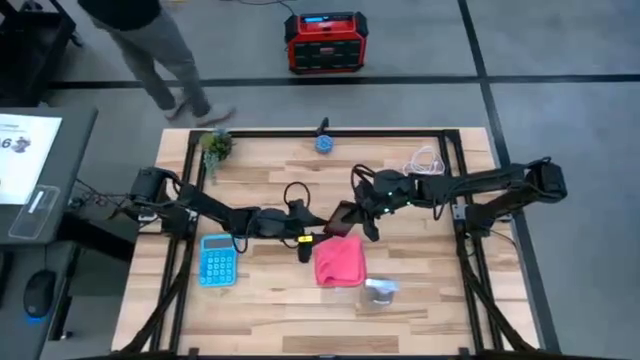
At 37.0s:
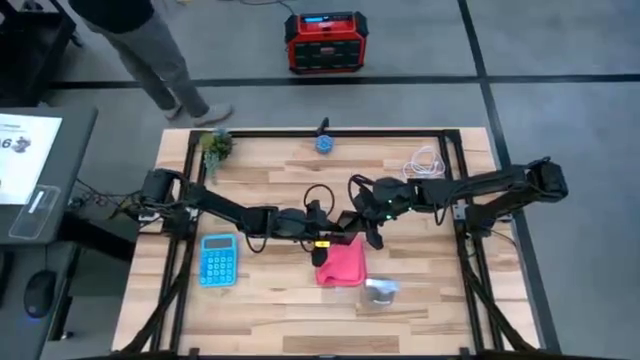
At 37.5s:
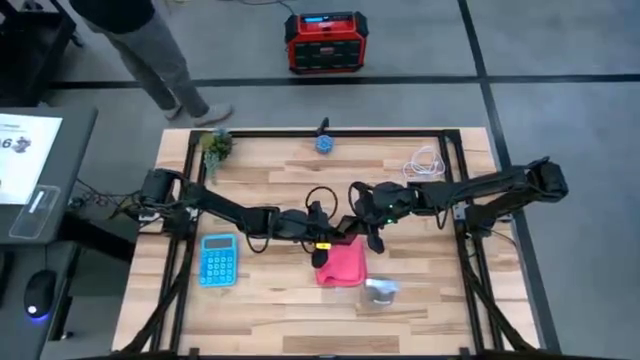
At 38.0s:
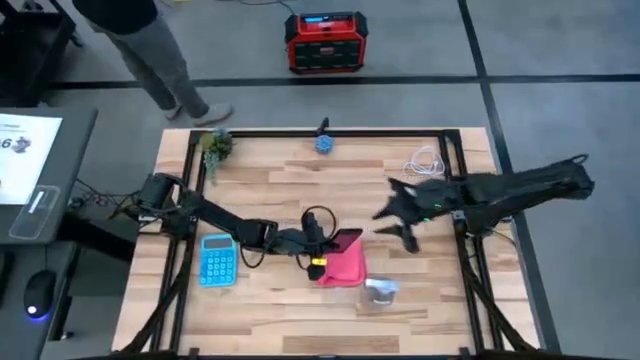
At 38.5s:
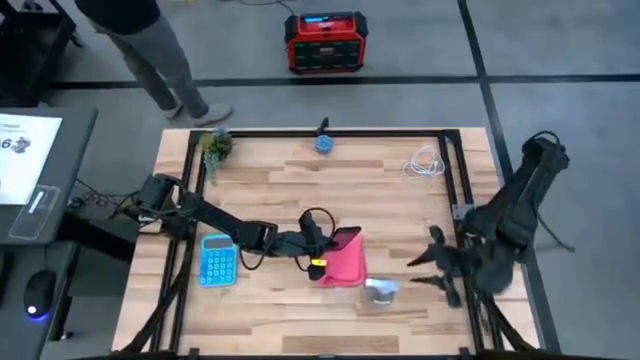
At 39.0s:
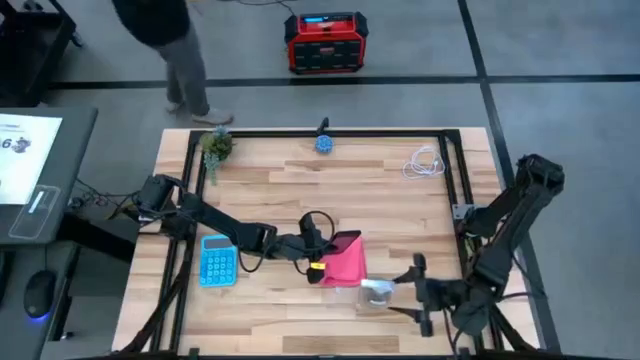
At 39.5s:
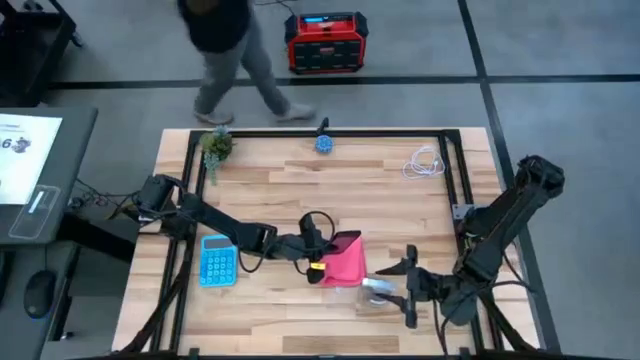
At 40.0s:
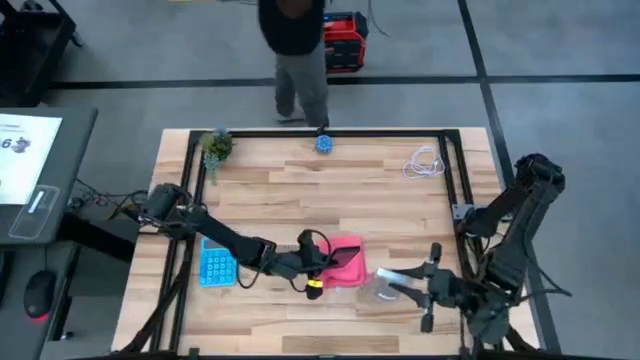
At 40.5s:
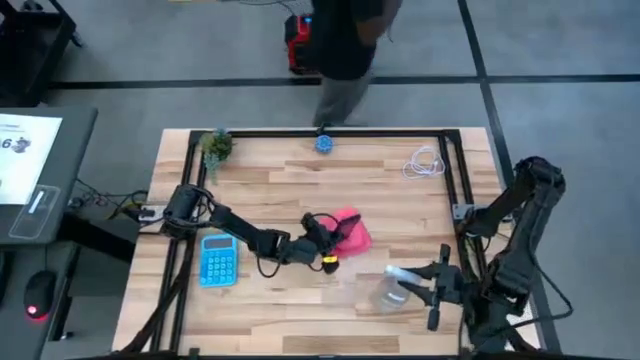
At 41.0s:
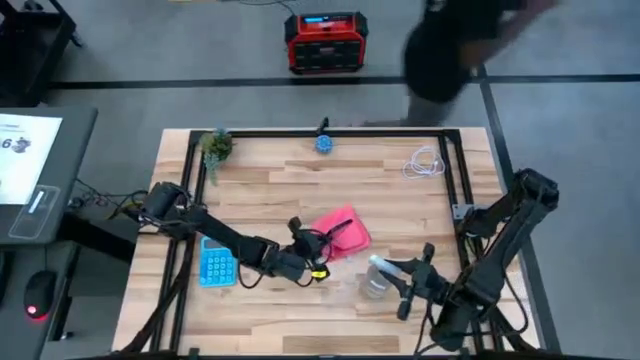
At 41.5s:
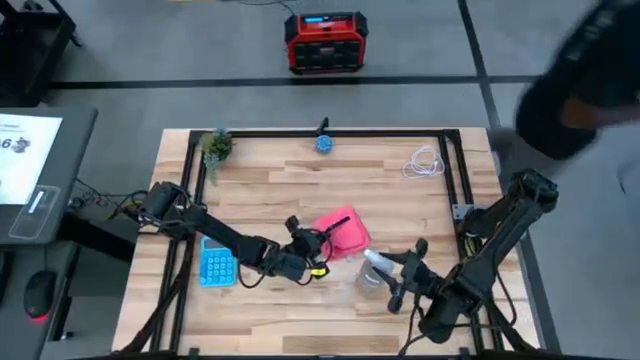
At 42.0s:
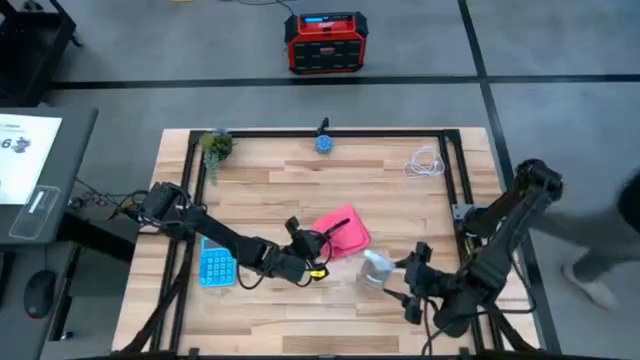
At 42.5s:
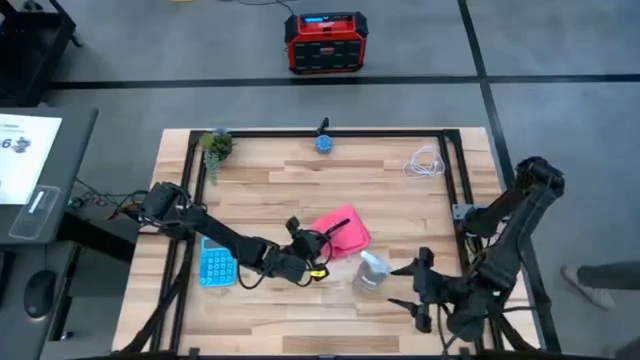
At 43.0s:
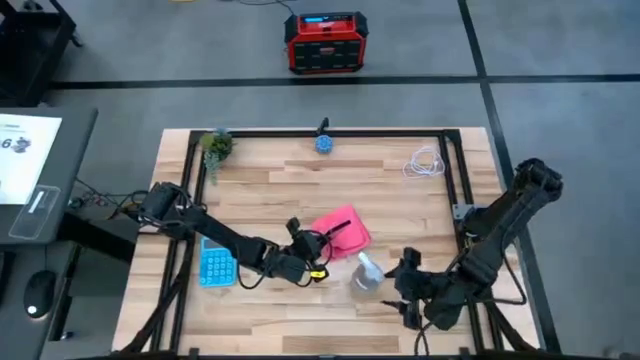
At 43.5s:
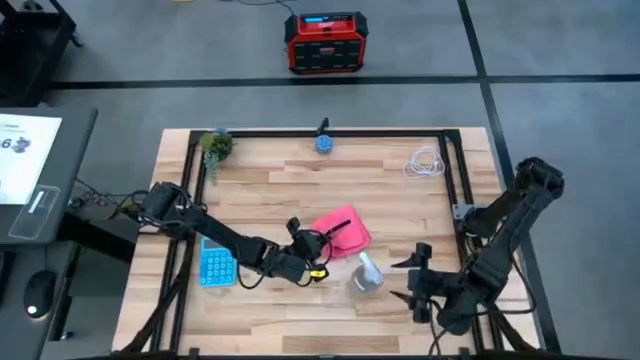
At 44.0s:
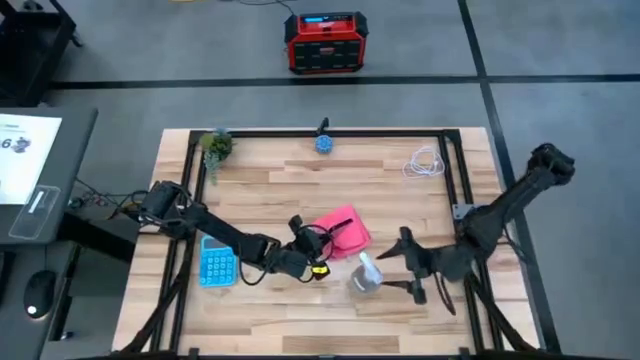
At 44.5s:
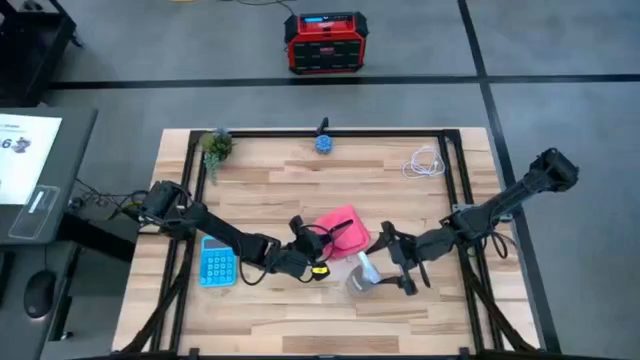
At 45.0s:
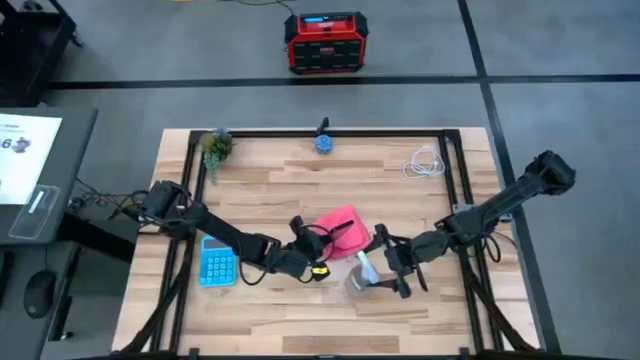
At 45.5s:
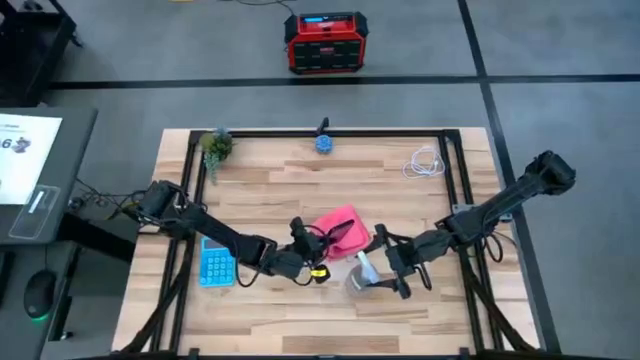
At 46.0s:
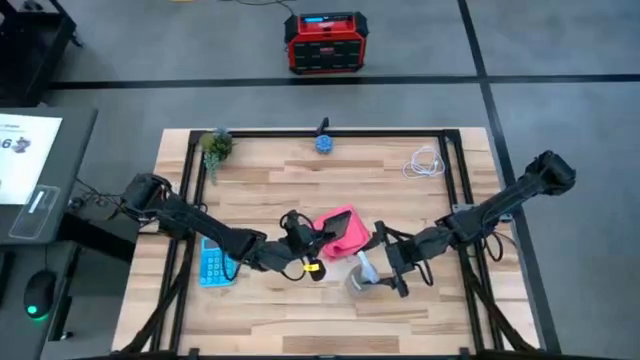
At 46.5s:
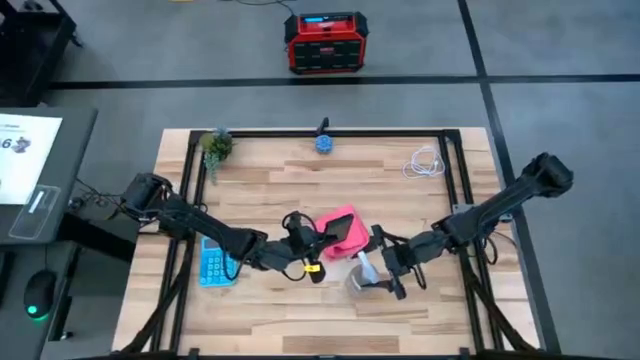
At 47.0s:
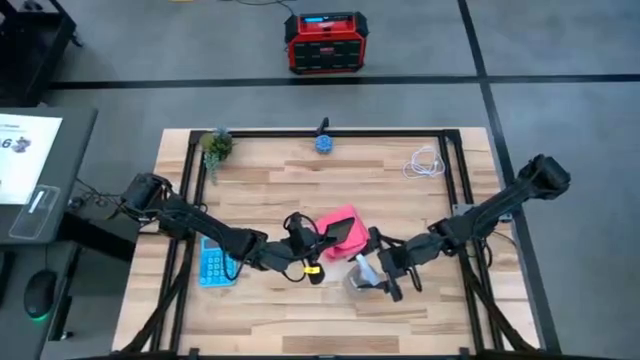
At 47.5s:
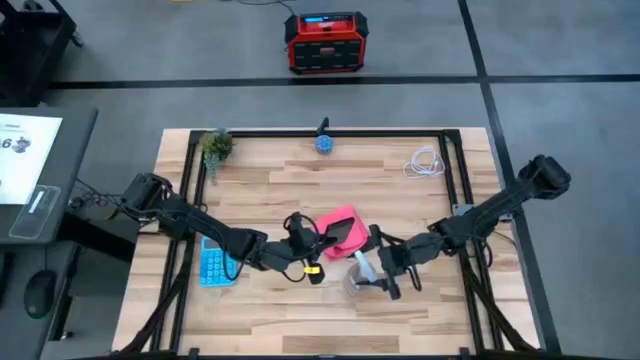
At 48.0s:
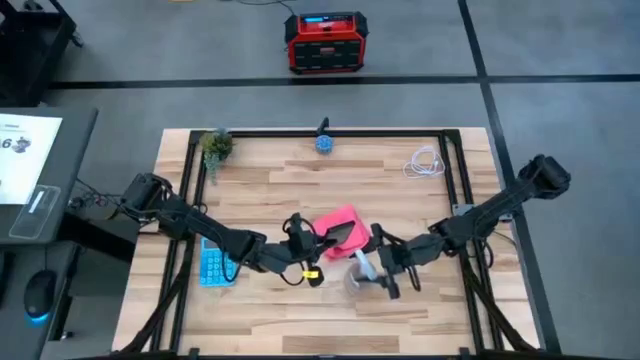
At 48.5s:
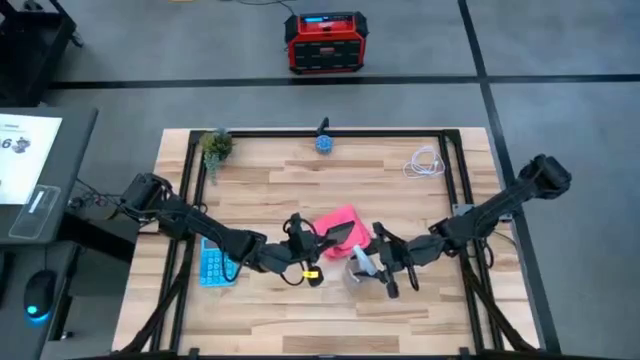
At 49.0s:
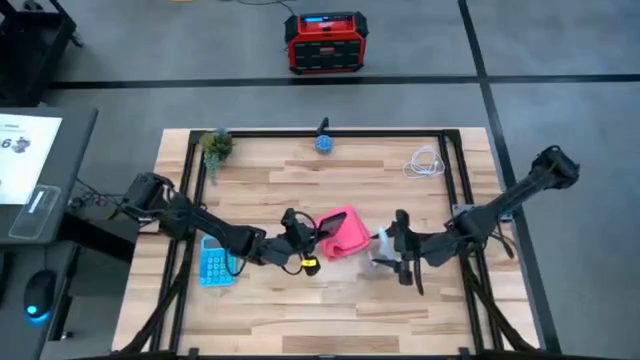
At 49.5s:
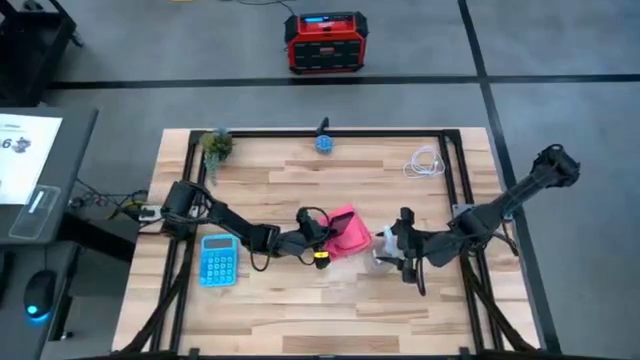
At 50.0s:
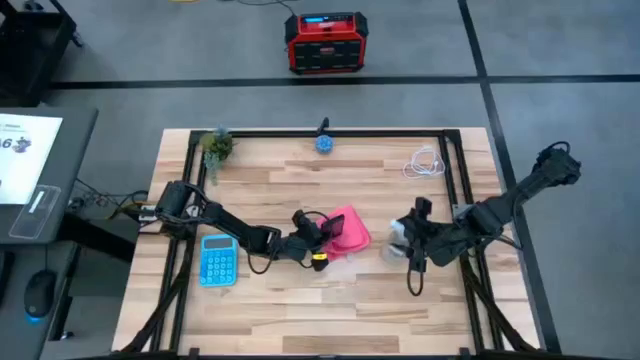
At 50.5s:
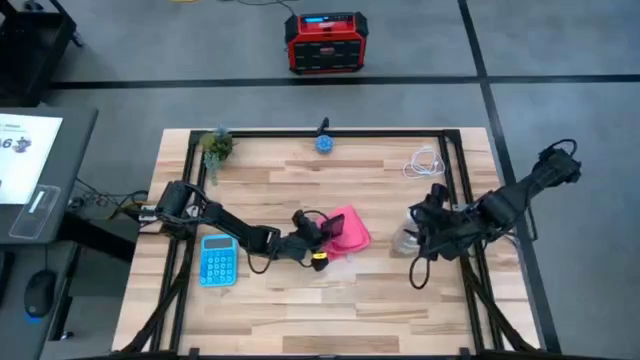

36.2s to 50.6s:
Task: Apply microfiber cloth
Spray the front of the black cellphone using transparent spray bottle

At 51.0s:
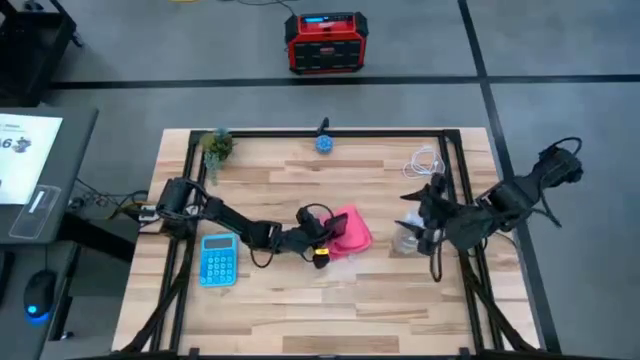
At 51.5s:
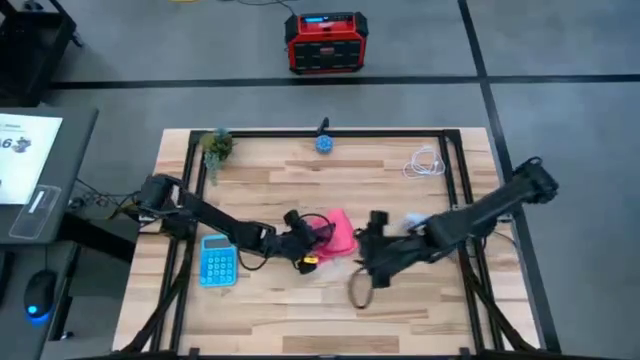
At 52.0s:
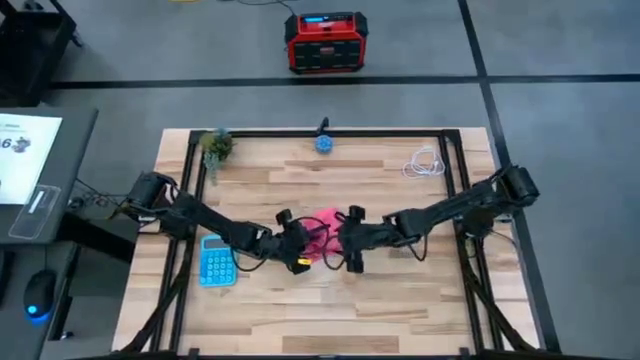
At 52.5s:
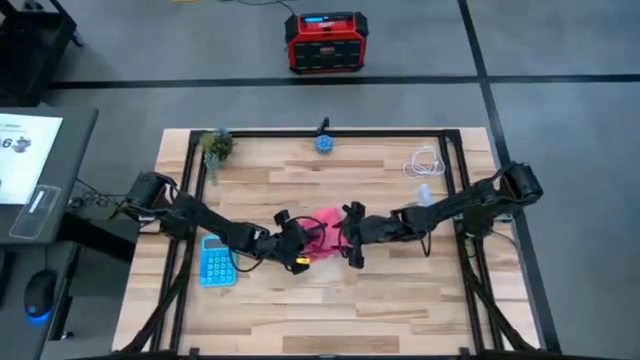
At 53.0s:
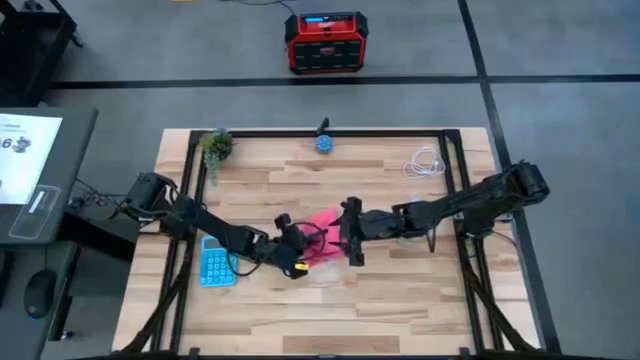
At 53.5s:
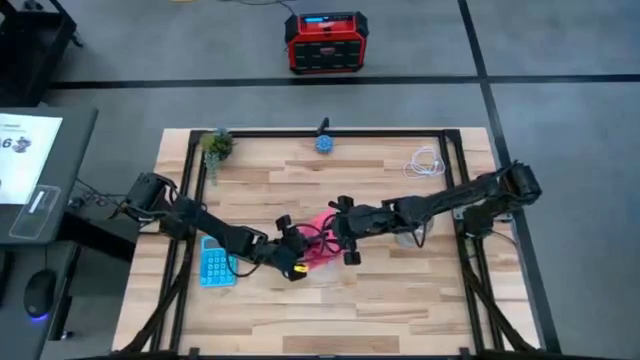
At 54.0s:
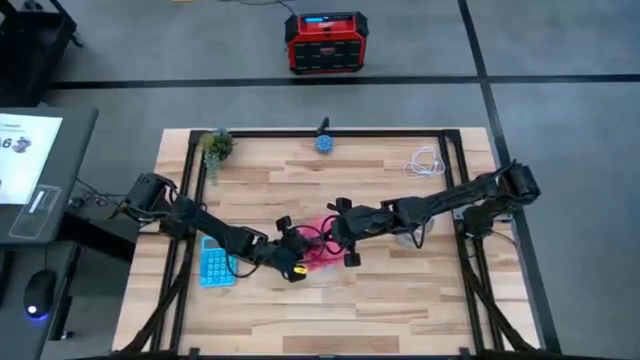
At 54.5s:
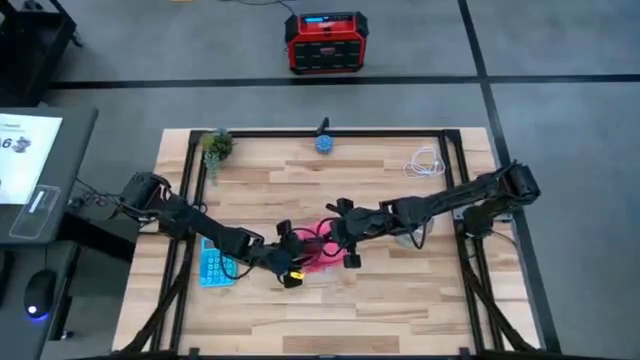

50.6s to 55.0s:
Wipe the front of the black cellphone using the pink microfiber cloth

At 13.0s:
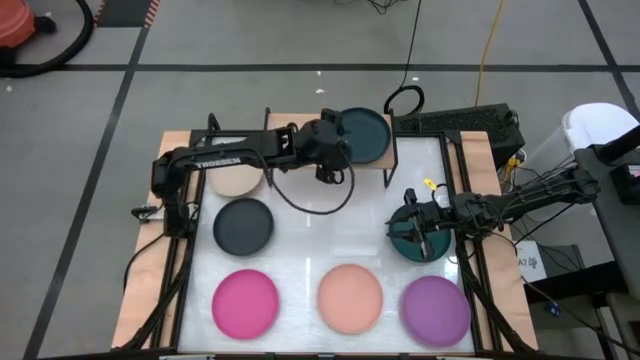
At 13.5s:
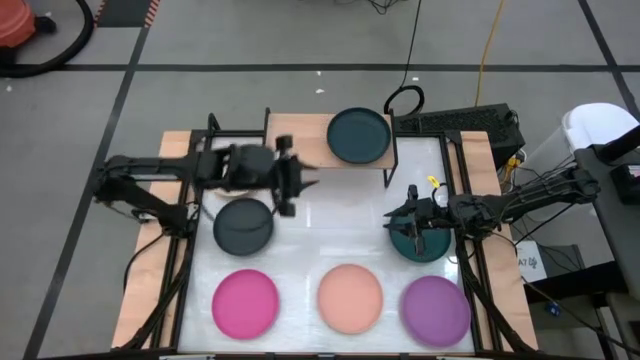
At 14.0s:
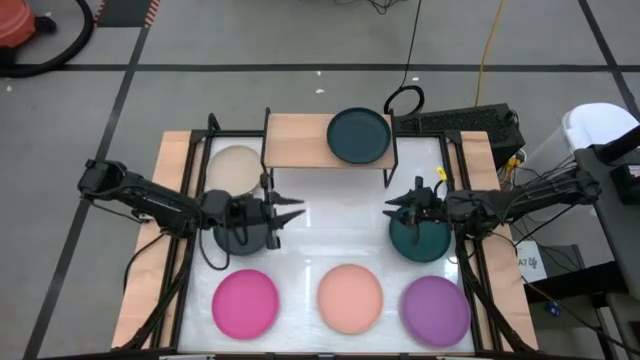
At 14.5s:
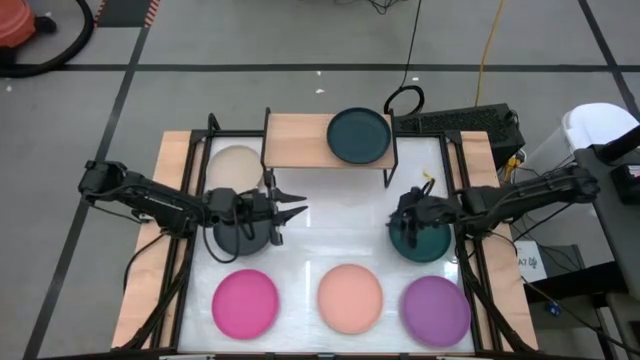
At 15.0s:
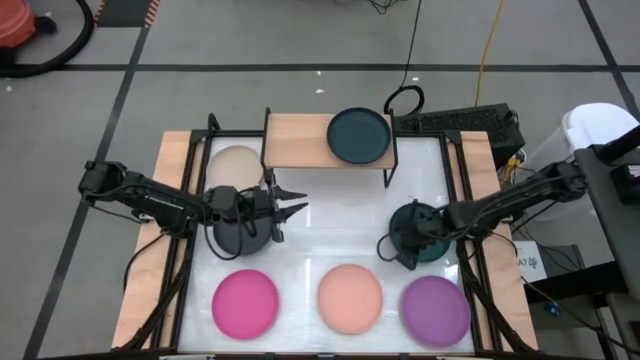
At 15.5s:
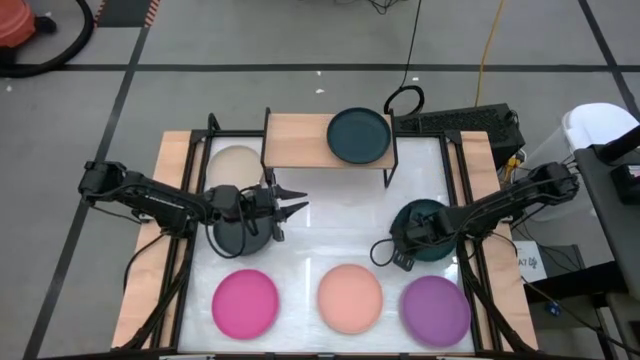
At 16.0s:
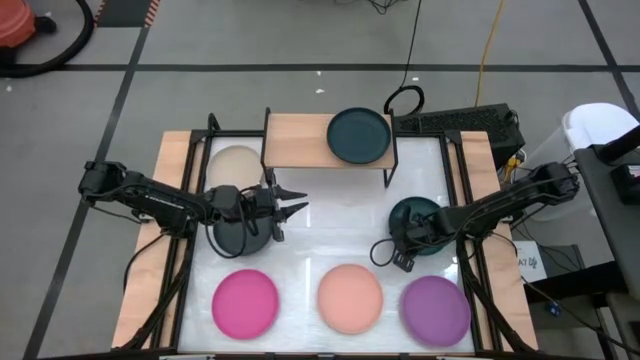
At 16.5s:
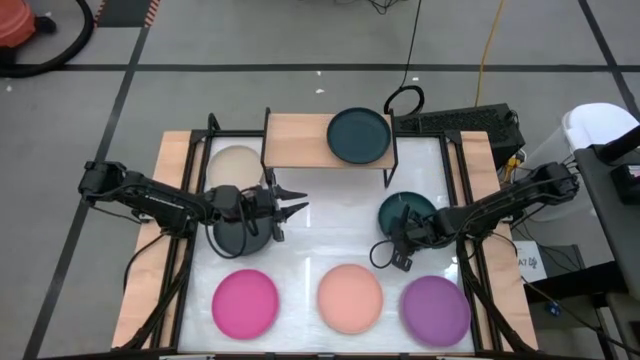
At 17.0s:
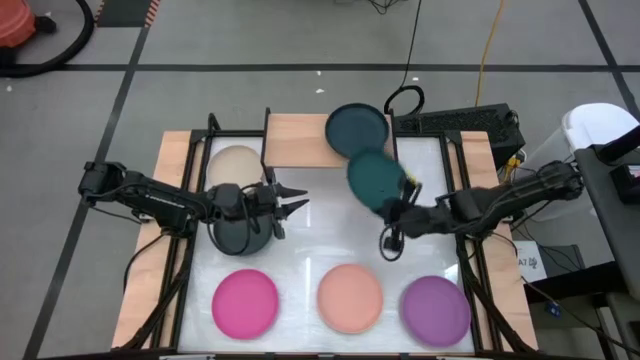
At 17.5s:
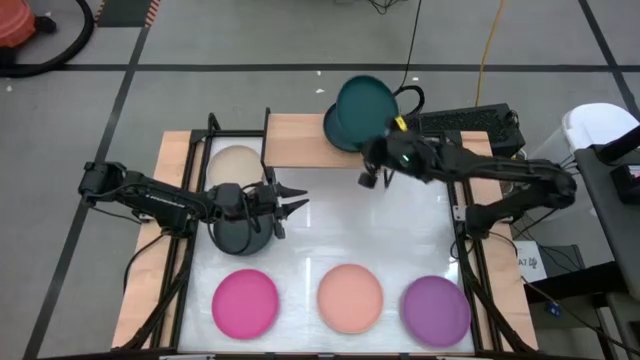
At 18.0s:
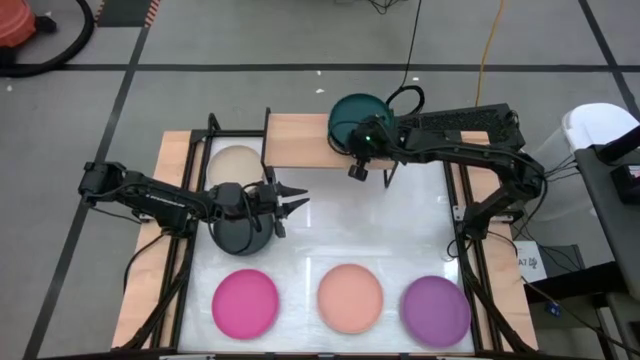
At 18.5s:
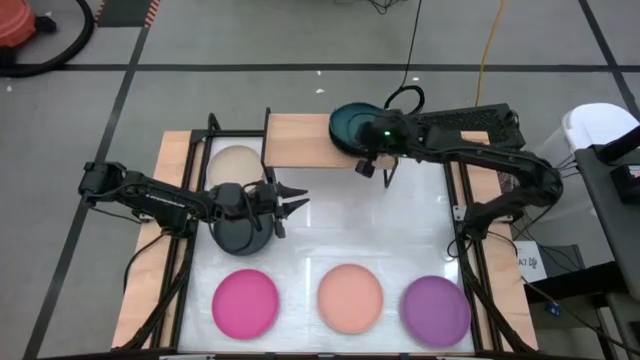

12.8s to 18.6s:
Task: Place and stack plates onto a shelf
Put the dark green plate on the dark blue plate on the shelf
